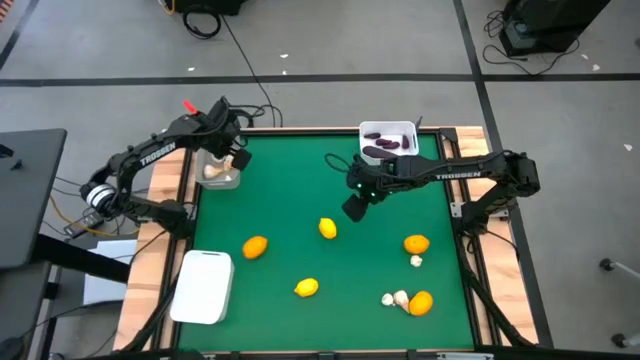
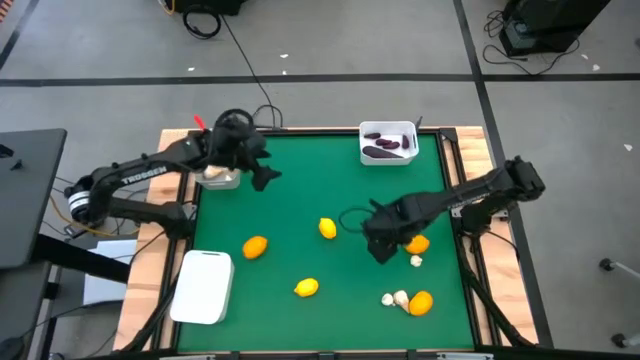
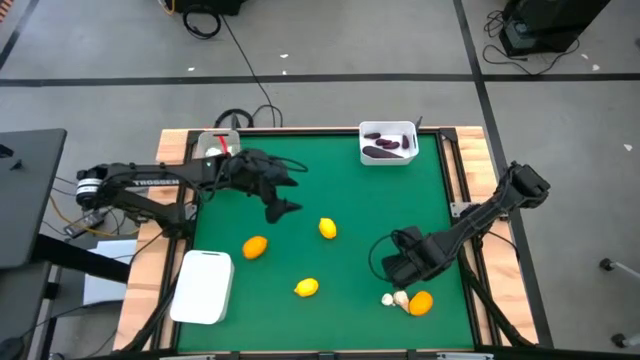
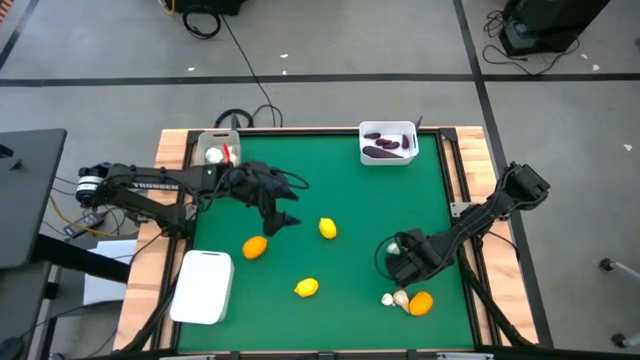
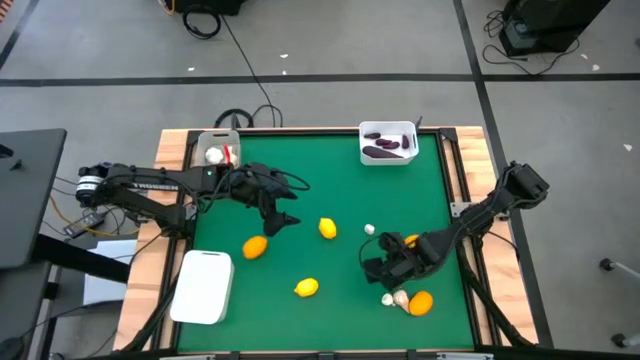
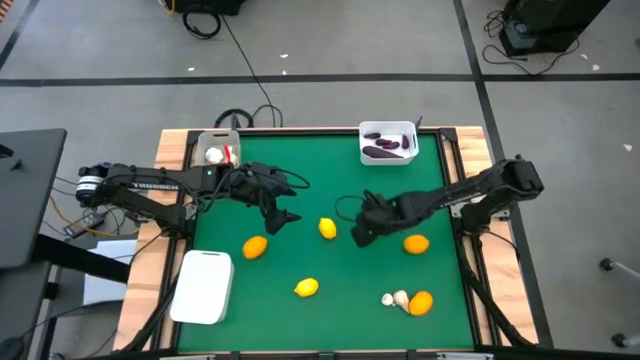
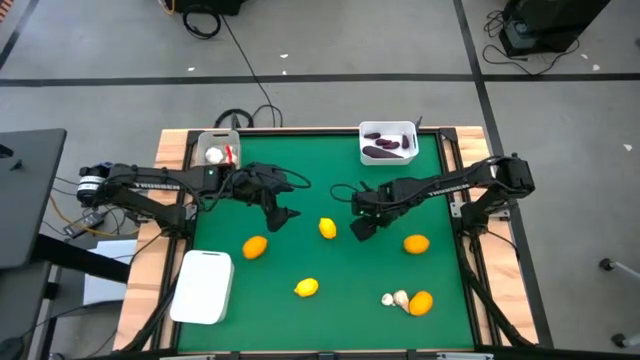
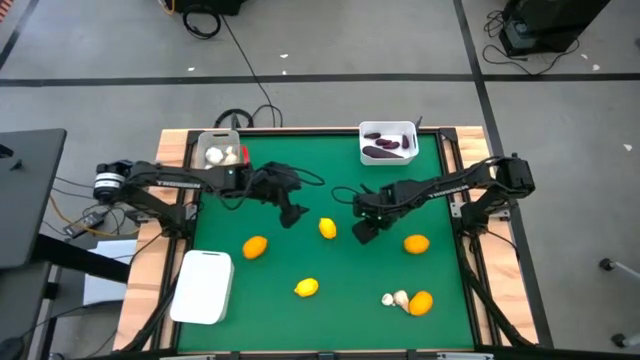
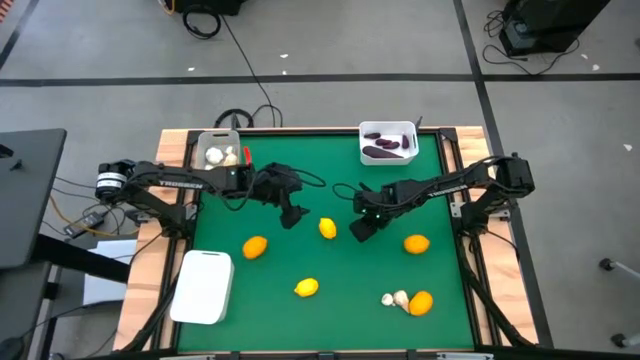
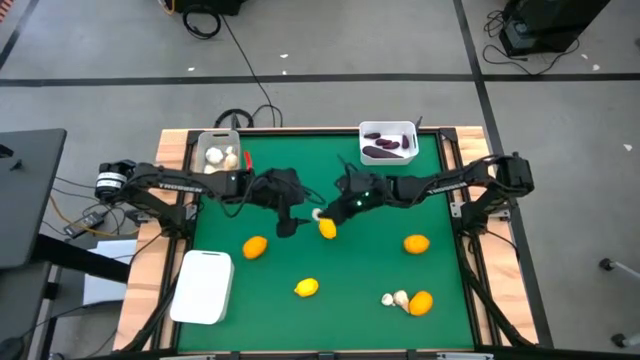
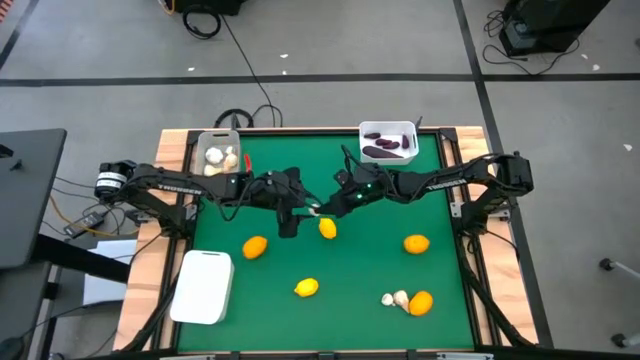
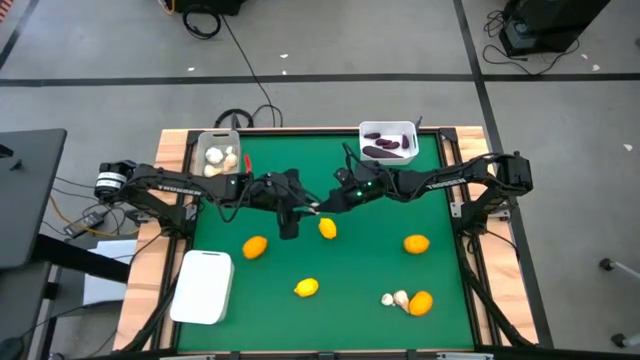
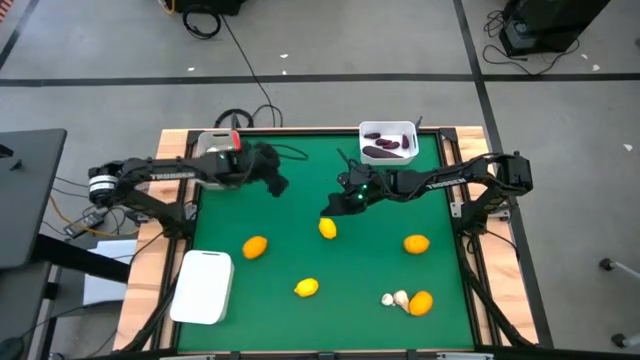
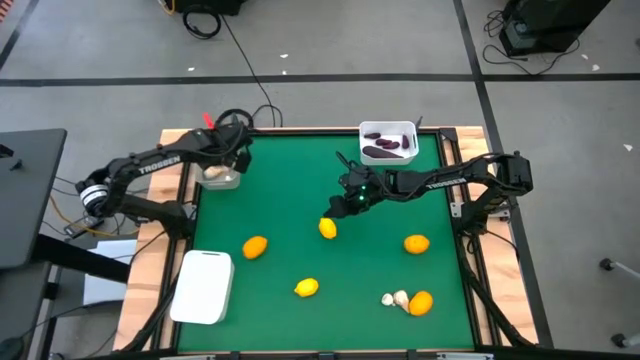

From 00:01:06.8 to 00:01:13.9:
Task: Sort produce into baskets
Put the garlic into the gray bin

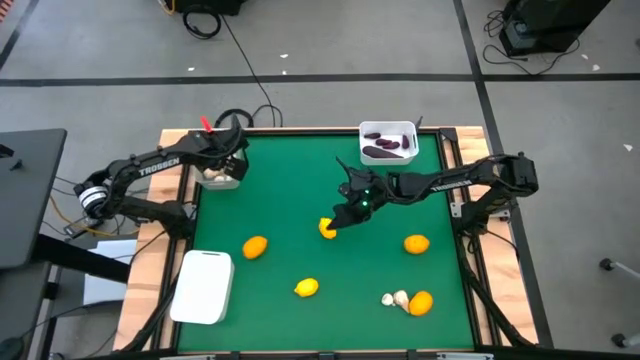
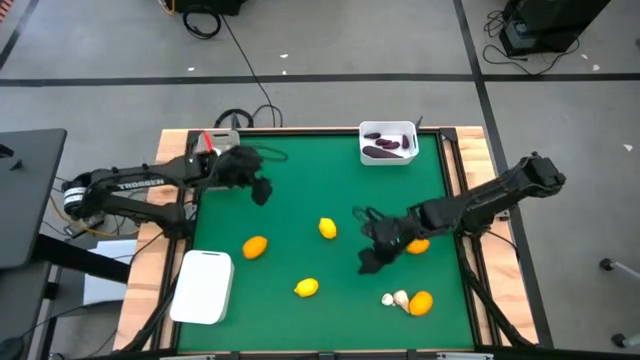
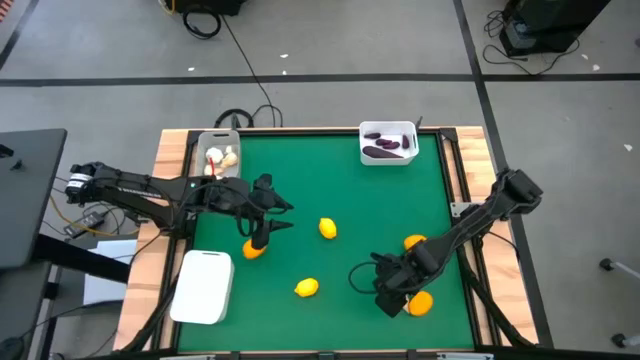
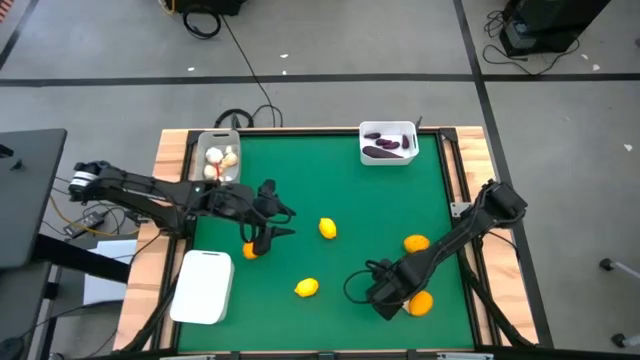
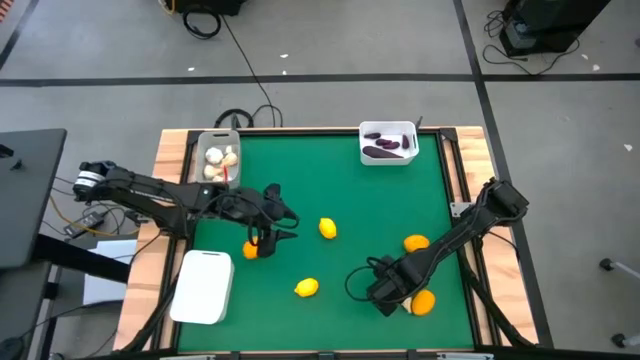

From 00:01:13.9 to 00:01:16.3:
Put the garlic into the gray bin

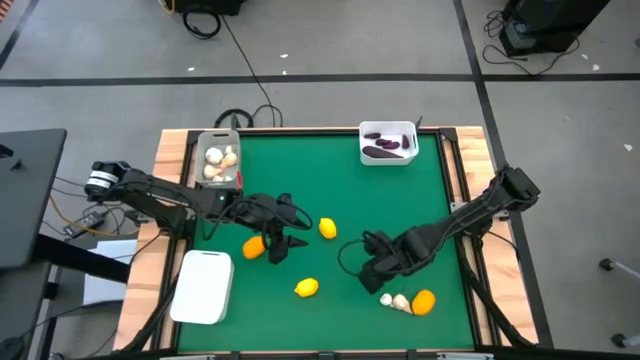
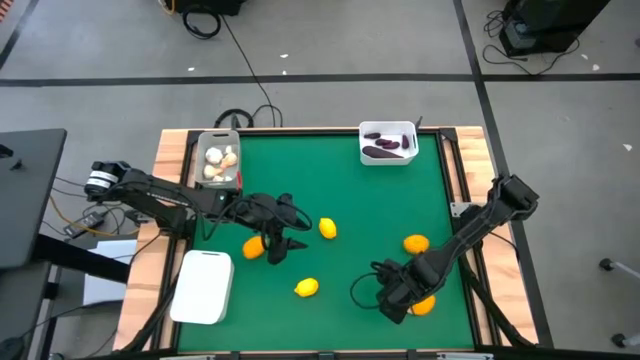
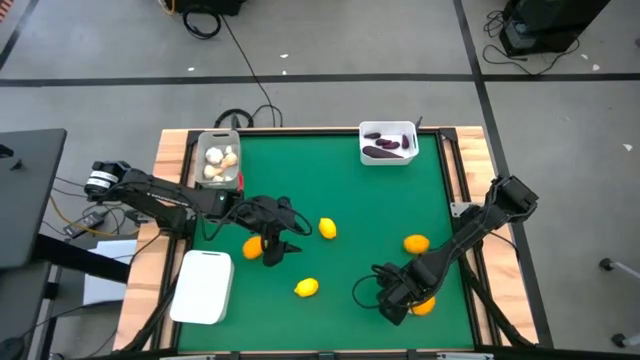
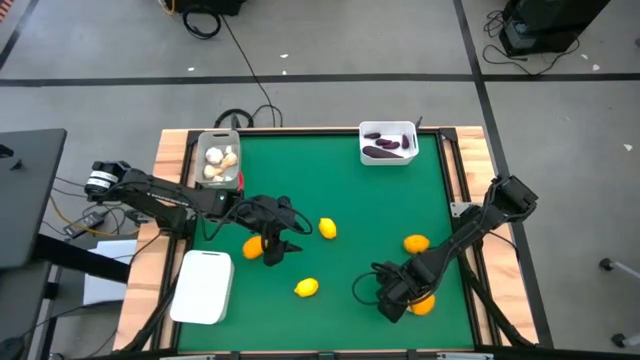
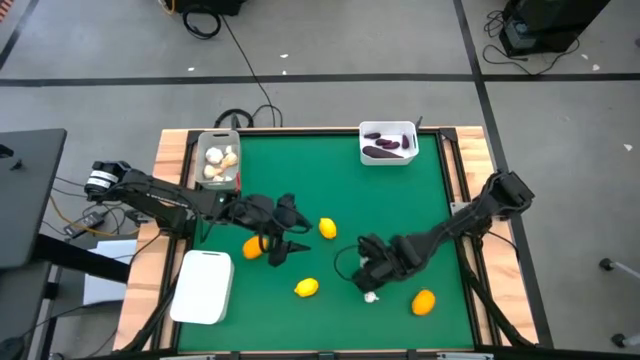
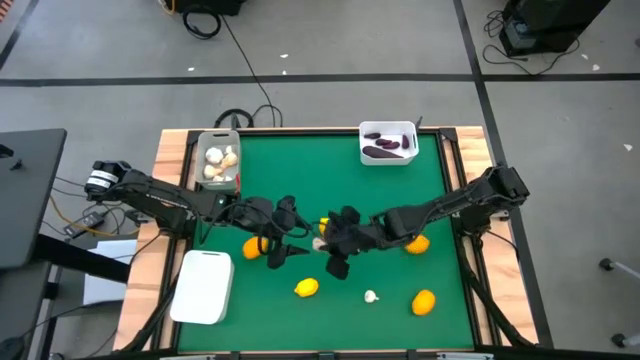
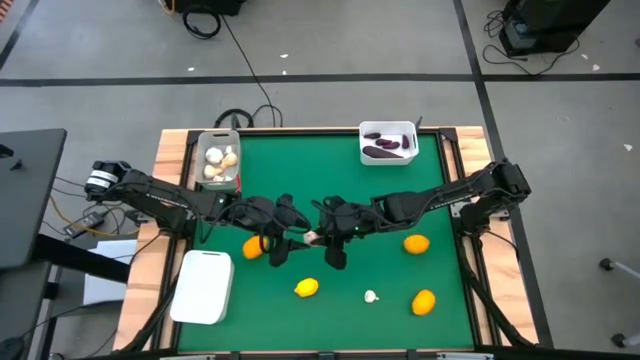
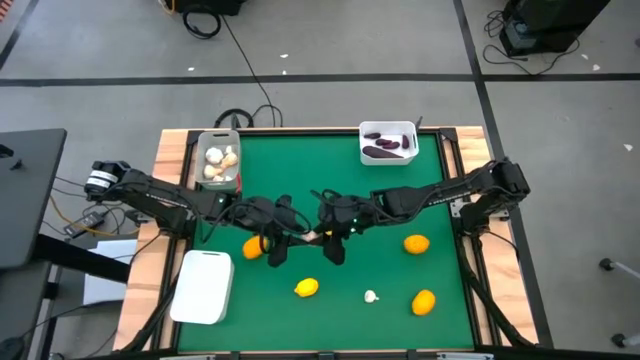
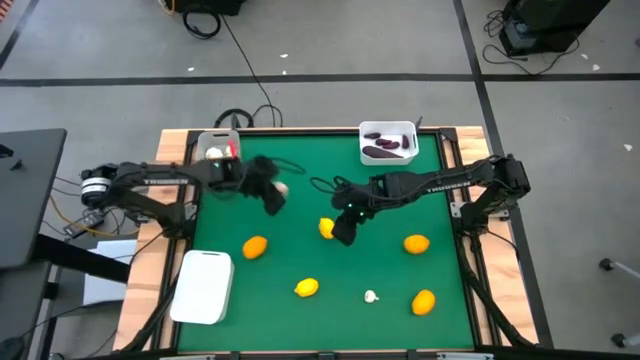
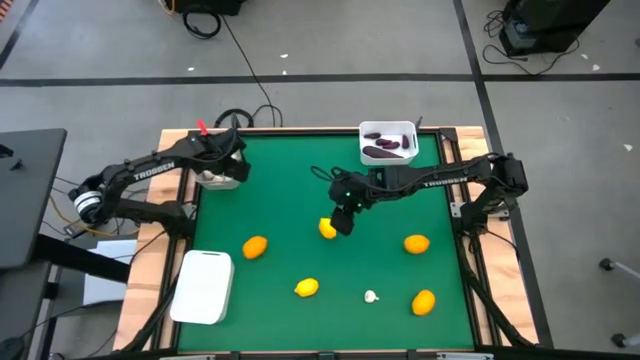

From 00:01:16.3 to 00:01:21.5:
Put the garlic into the gray bin

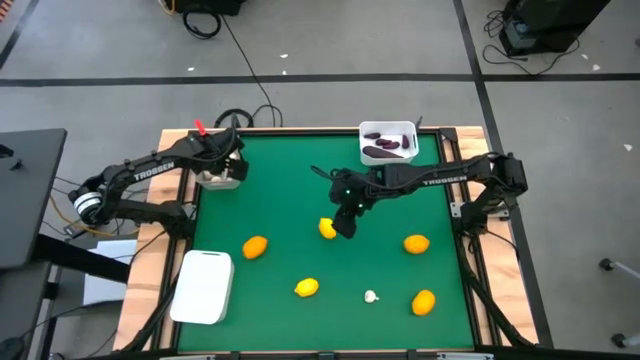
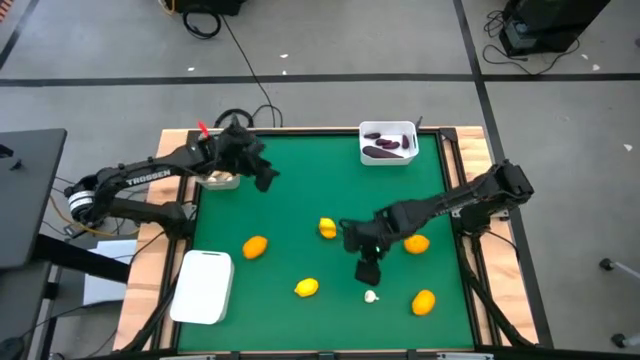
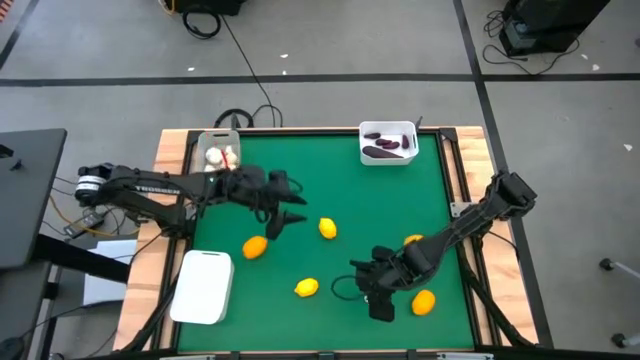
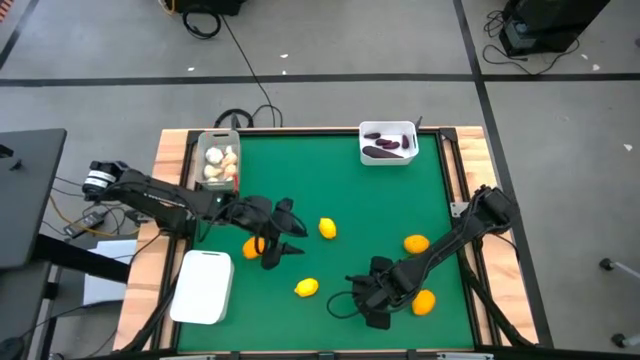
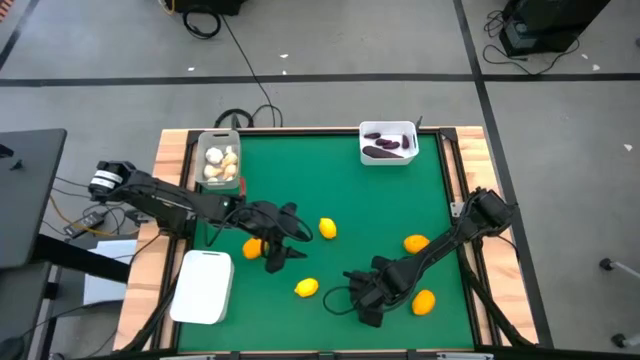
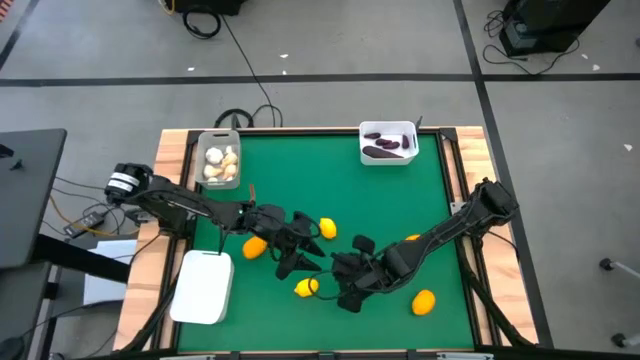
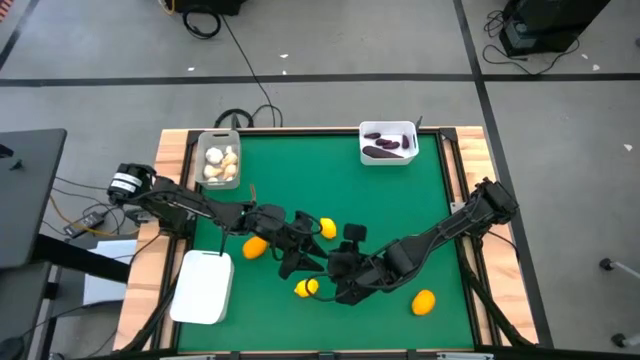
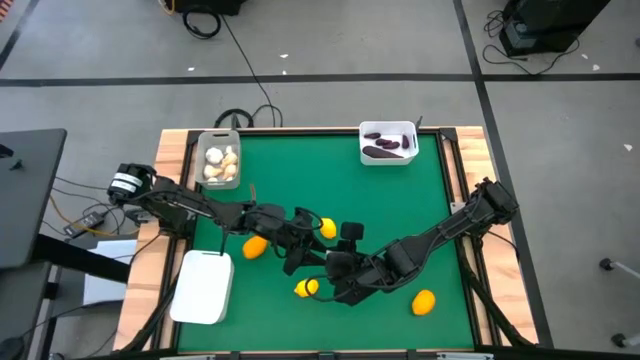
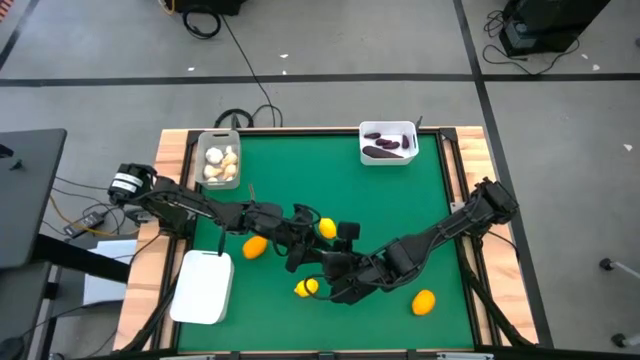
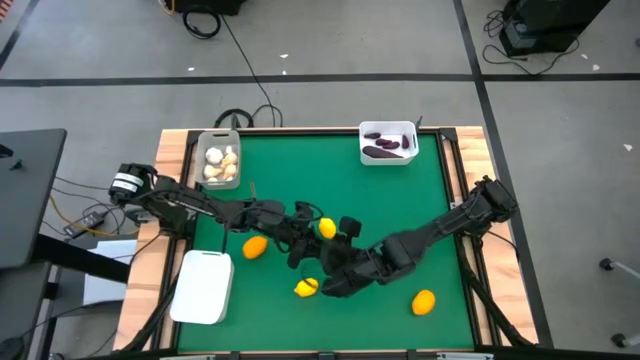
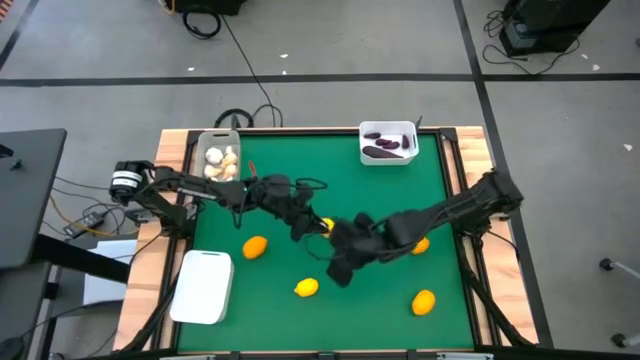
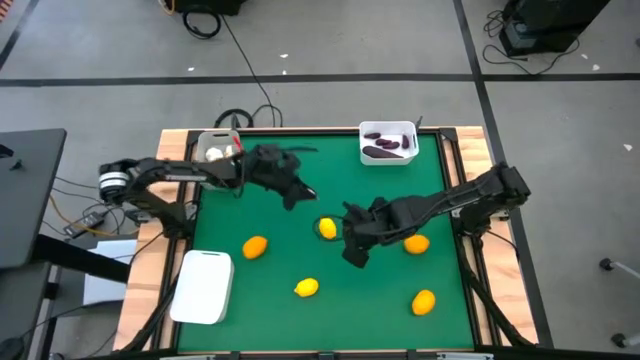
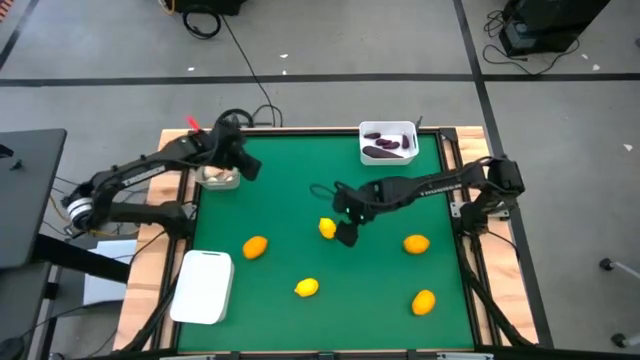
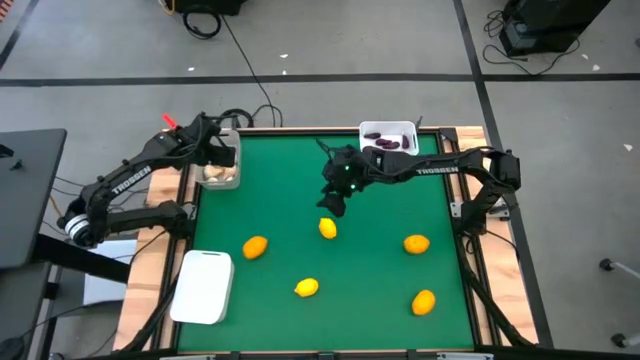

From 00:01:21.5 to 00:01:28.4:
Put the garlic into the gray bin
